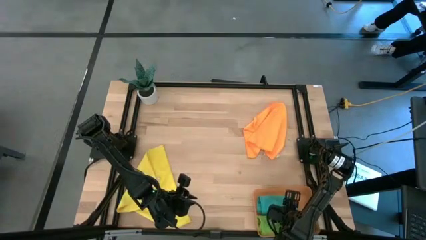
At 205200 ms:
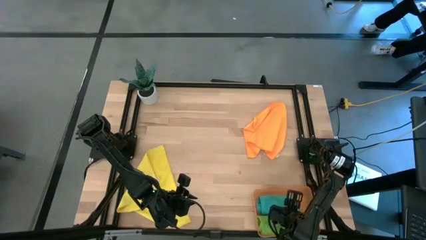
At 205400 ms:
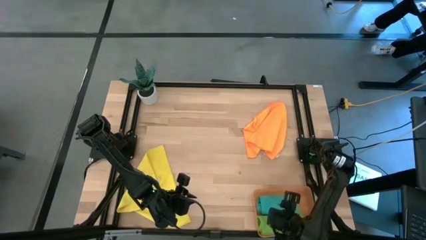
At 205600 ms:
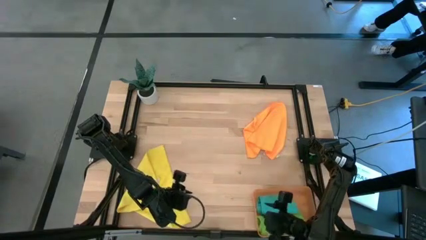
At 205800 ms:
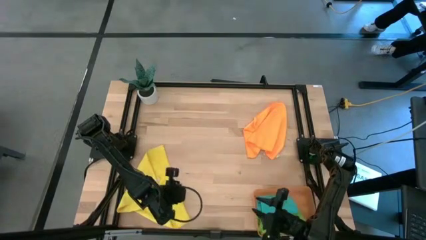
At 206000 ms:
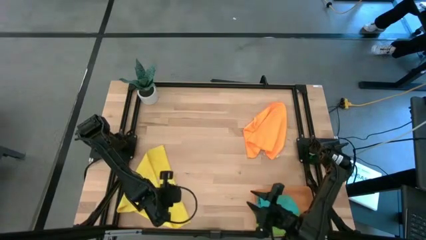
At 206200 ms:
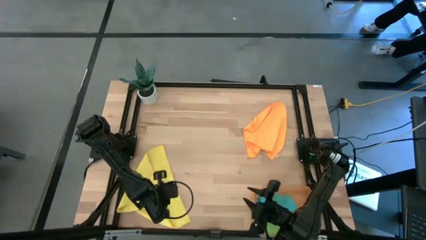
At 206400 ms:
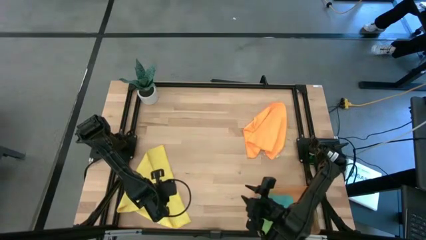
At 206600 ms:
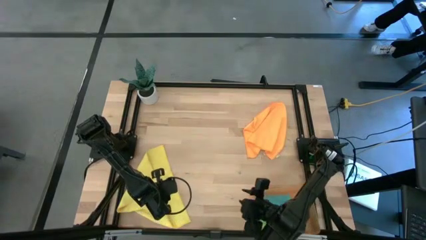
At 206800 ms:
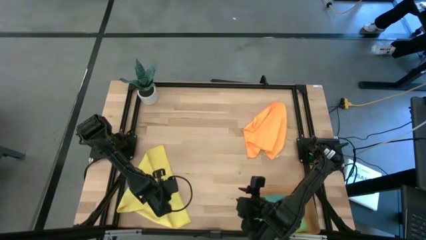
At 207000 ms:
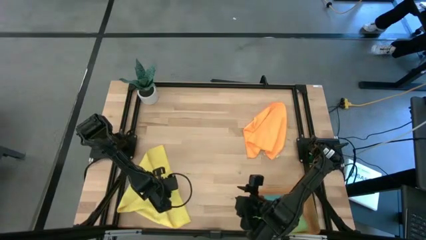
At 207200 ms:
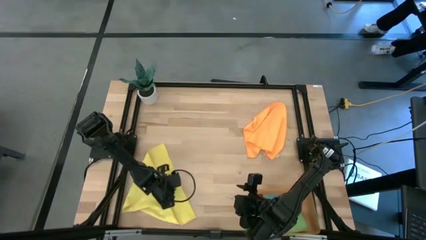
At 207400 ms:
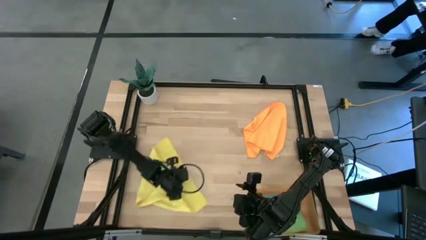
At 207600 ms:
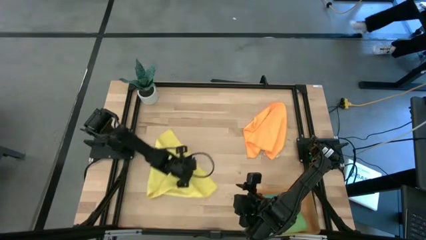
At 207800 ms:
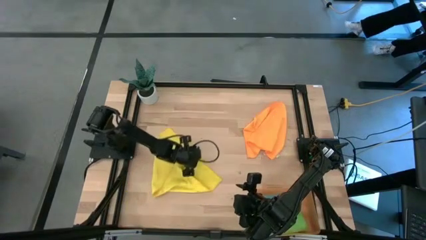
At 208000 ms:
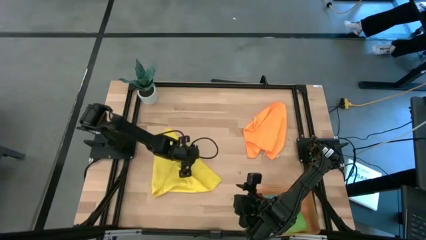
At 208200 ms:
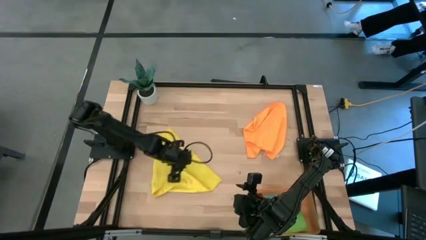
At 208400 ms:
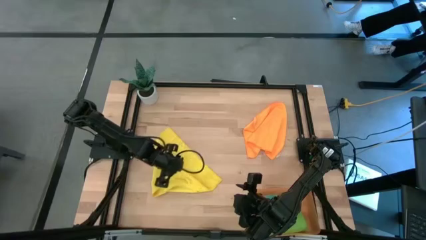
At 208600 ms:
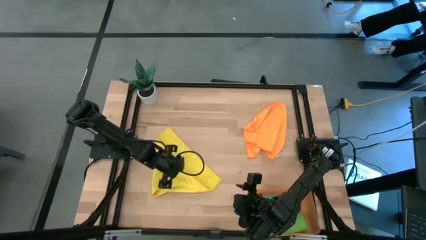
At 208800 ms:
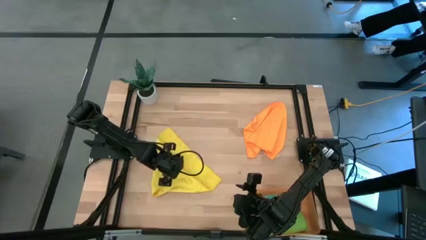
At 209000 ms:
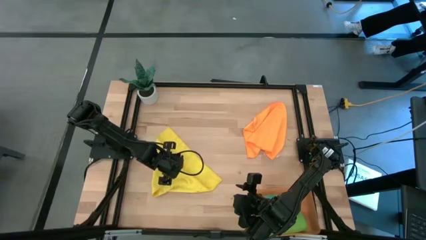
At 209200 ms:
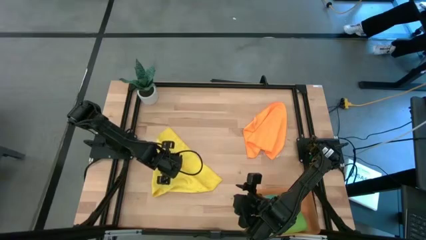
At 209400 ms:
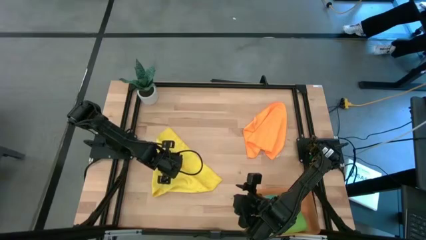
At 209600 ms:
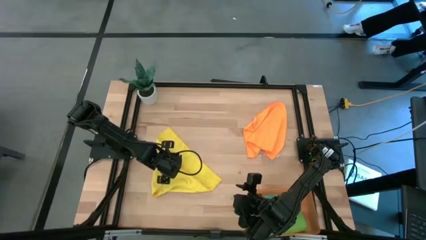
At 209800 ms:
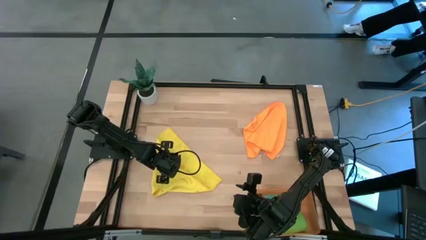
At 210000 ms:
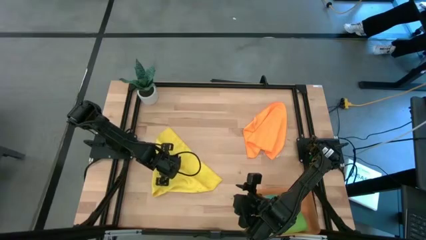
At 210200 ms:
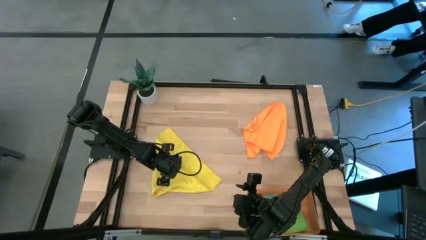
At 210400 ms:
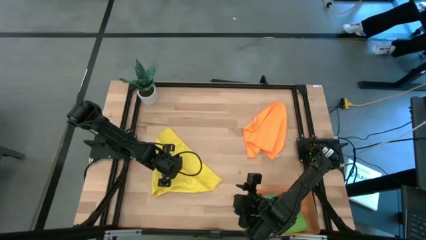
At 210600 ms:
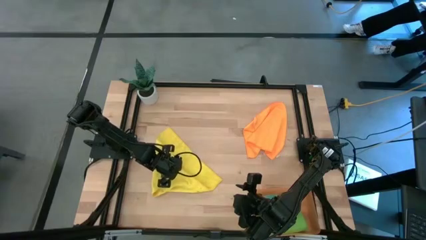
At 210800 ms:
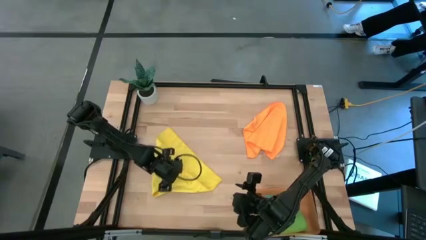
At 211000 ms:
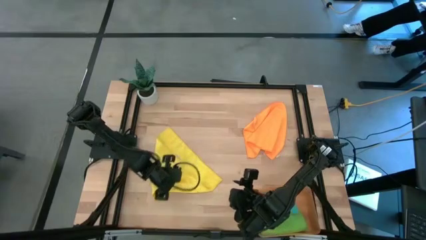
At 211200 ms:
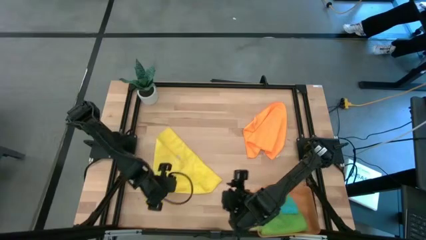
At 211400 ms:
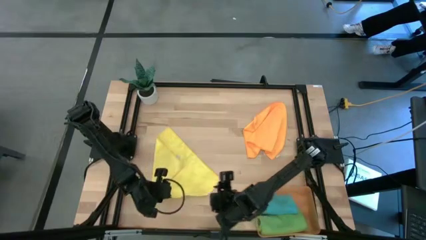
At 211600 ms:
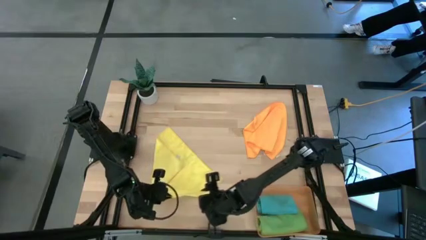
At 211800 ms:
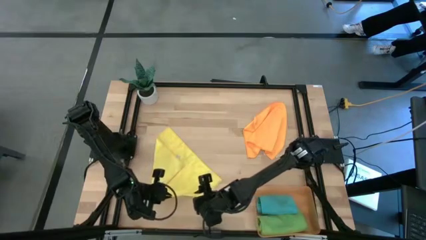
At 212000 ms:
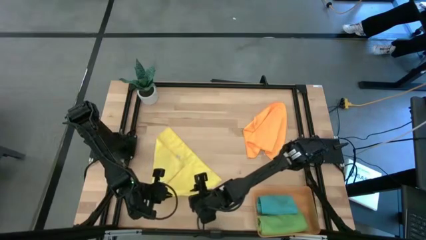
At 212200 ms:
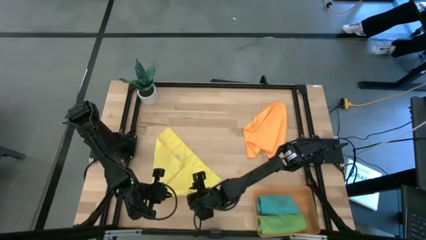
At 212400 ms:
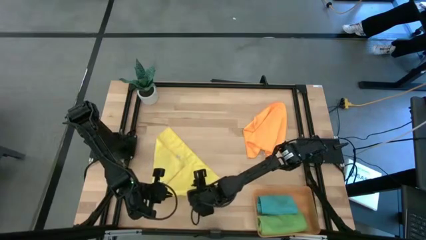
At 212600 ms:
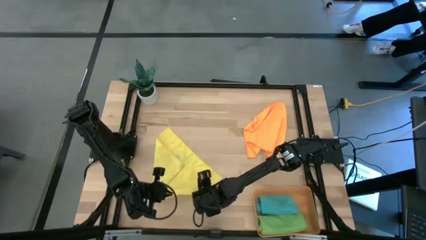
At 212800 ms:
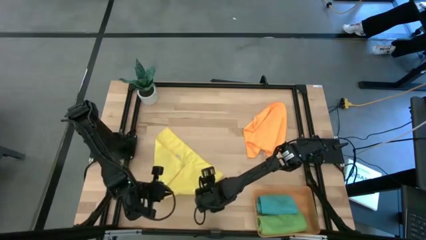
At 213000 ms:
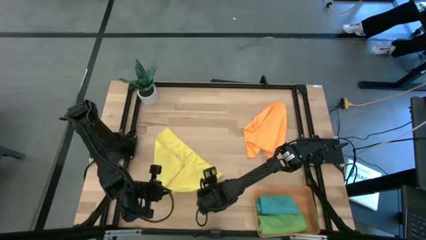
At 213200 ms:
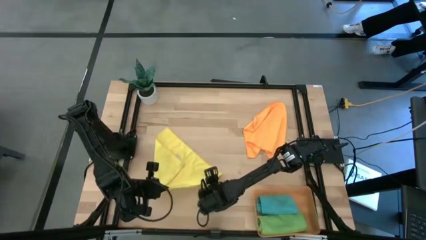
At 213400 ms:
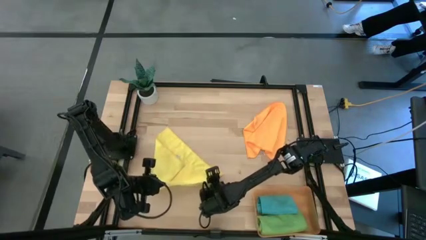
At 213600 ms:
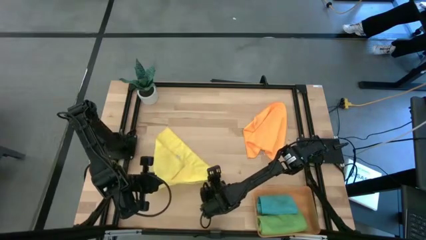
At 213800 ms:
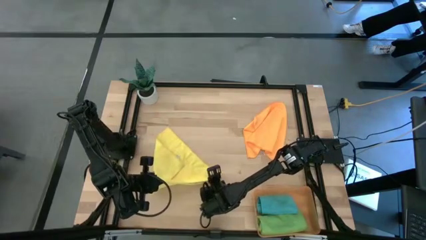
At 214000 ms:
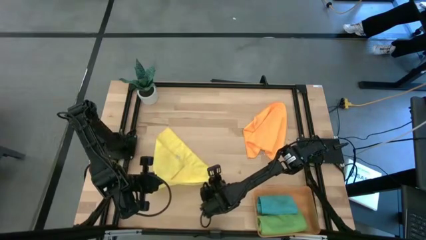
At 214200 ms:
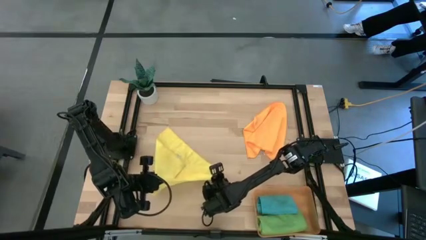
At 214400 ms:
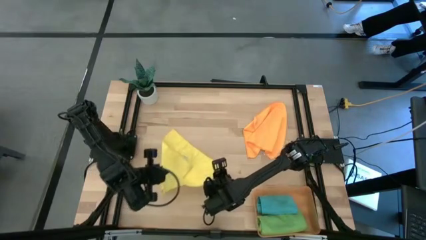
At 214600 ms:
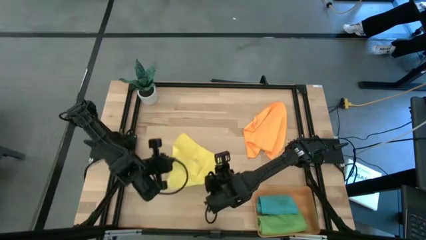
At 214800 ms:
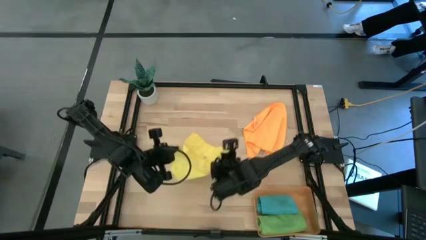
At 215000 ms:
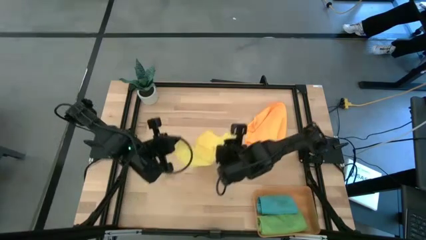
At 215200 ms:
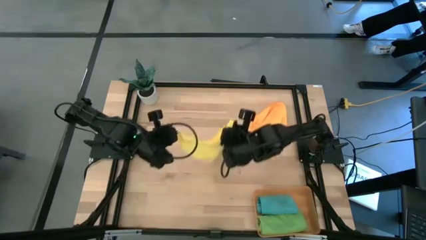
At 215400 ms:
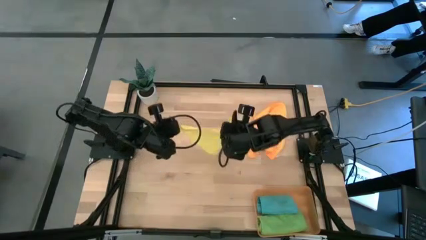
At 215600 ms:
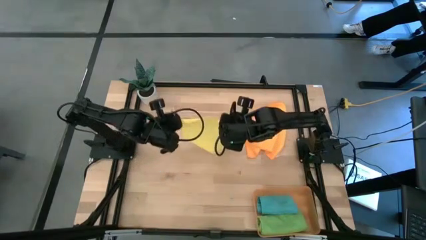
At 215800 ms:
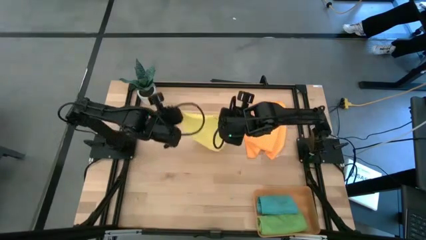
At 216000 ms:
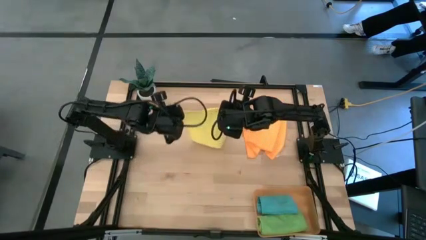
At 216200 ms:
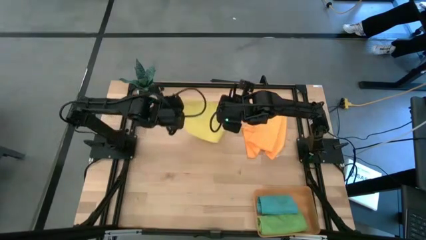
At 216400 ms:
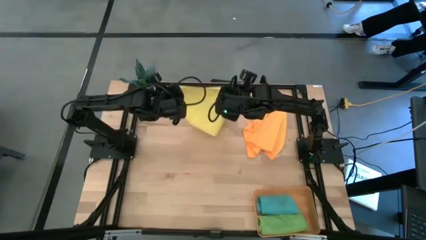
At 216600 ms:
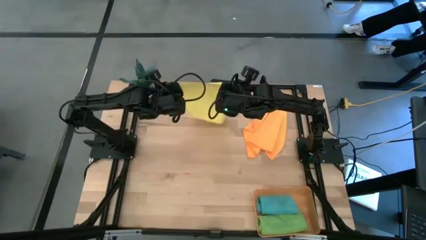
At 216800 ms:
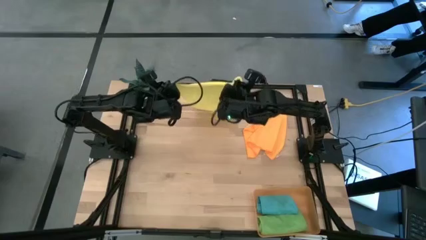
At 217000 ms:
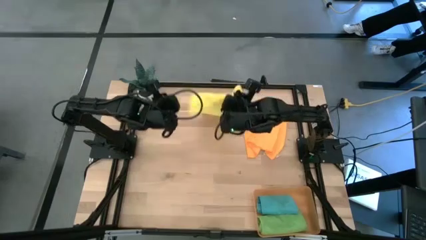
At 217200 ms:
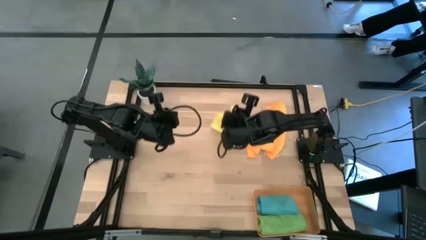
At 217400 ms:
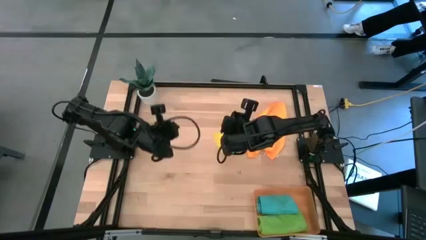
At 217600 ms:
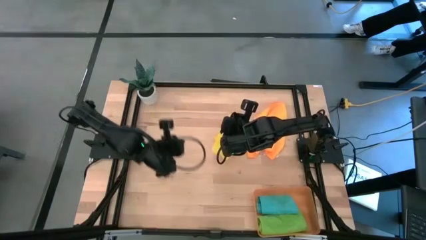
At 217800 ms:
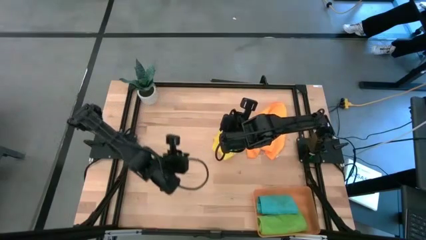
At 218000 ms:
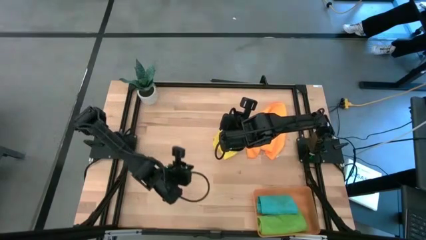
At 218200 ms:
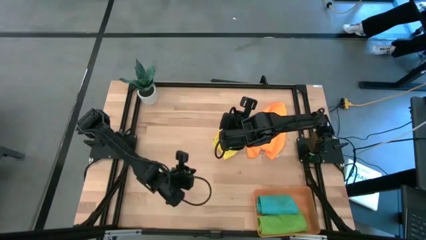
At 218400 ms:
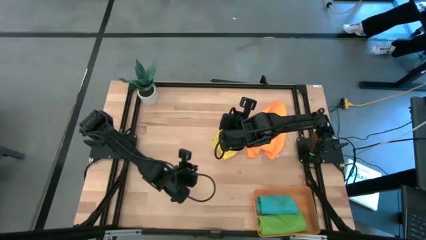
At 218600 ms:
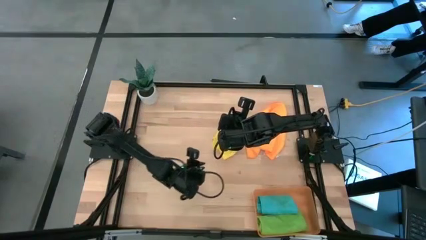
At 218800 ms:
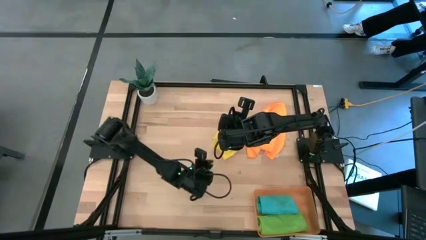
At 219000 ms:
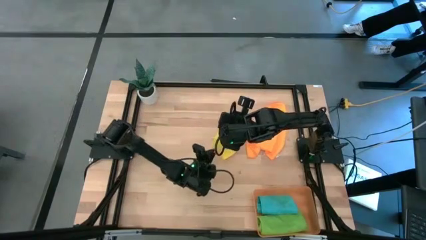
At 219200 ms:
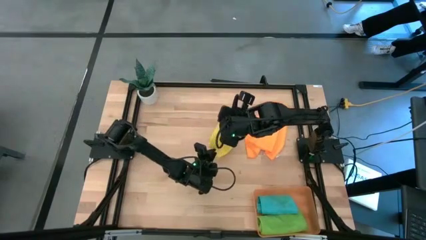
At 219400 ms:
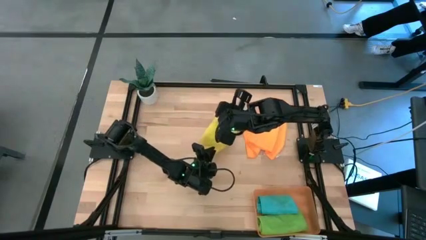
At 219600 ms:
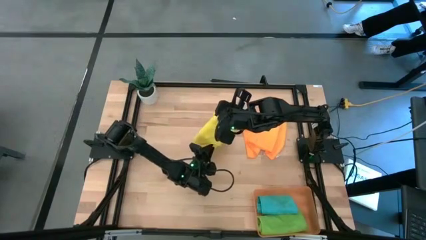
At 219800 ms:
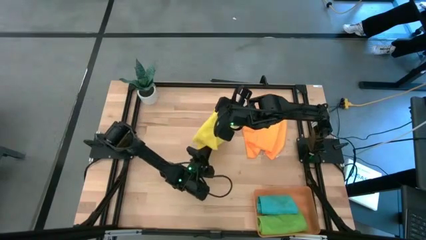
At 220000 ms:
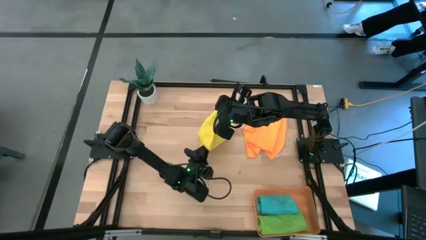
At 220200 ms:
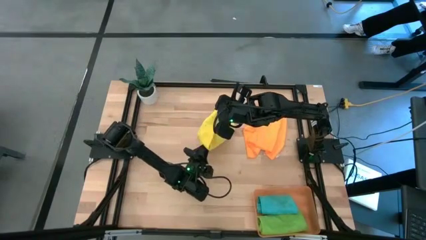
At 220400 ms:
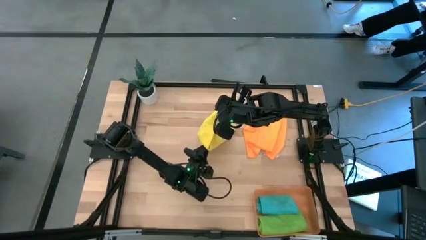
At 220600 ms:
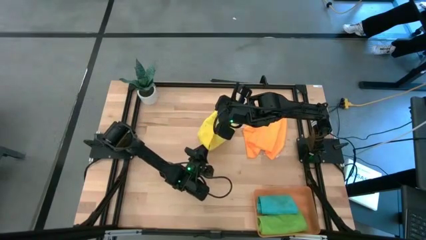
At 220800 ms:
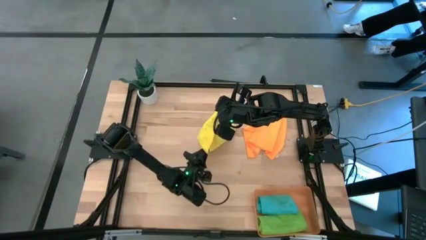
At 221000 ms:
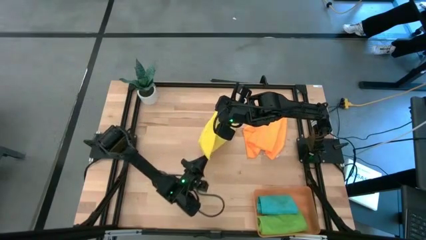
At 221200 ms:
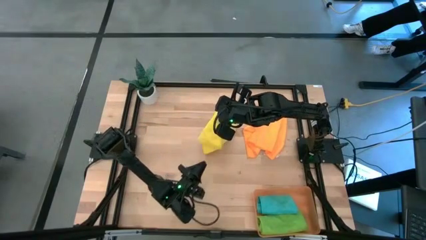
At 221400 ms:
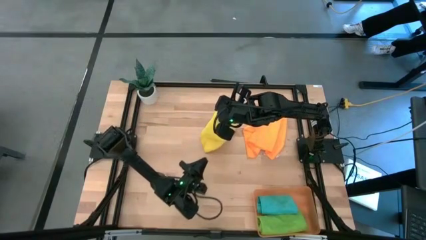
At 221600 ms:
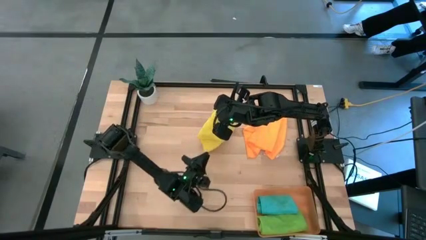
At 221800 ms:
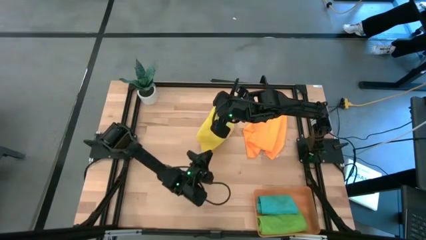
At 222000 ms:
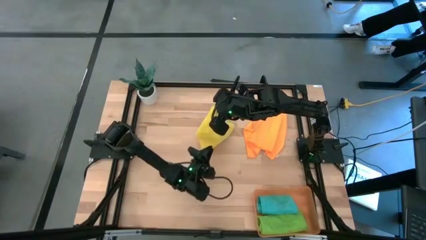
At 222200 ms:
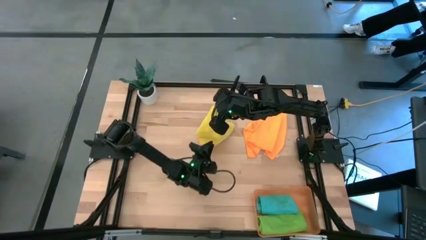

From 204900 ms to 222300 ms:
Task: Roll microfiber towels into tight, uniform cylinder then place into a basket
Roll the yellow microfiber towel
